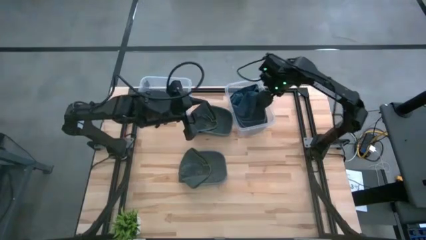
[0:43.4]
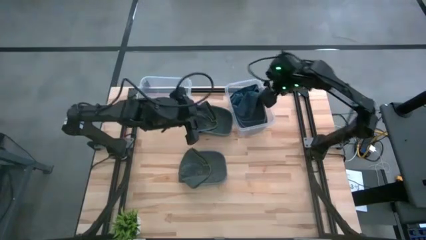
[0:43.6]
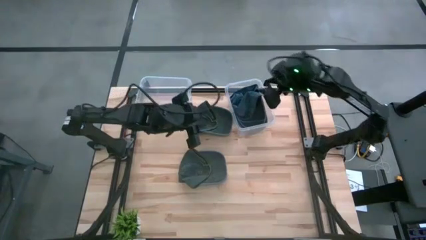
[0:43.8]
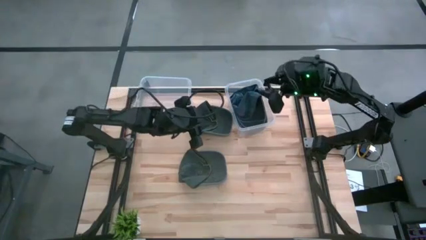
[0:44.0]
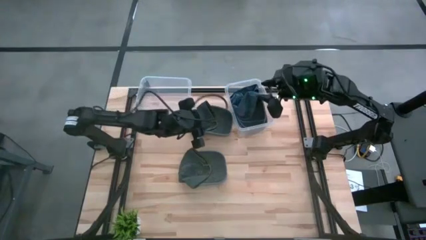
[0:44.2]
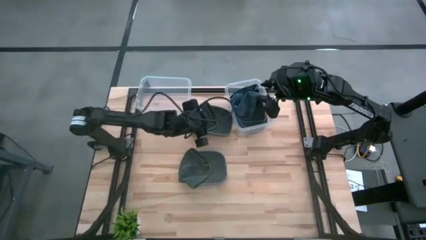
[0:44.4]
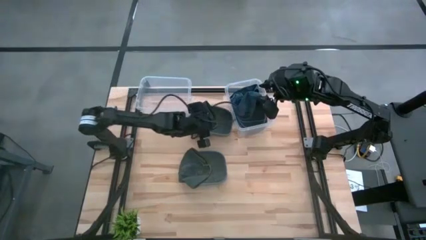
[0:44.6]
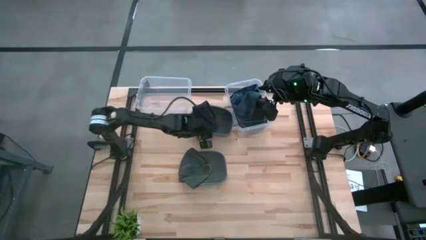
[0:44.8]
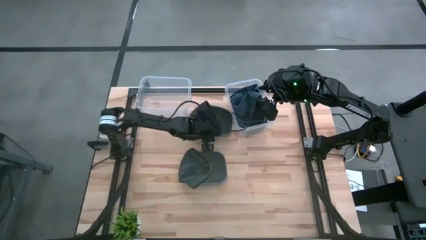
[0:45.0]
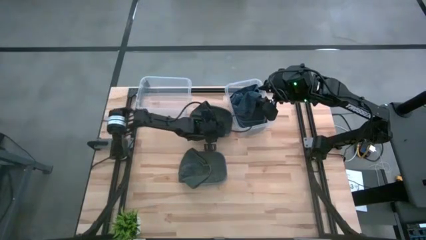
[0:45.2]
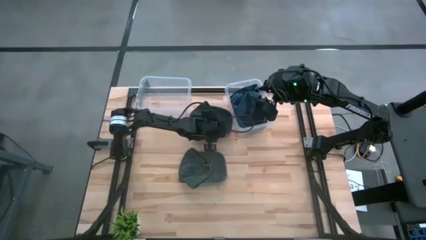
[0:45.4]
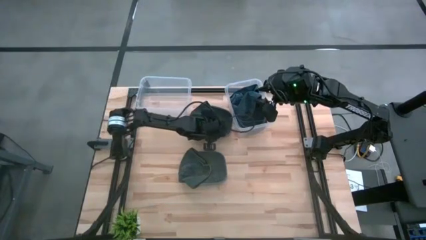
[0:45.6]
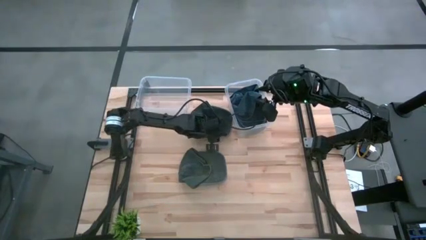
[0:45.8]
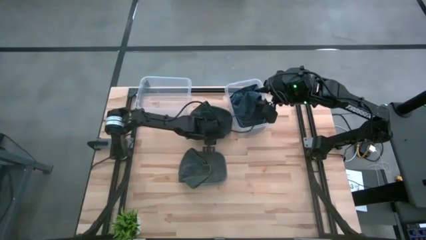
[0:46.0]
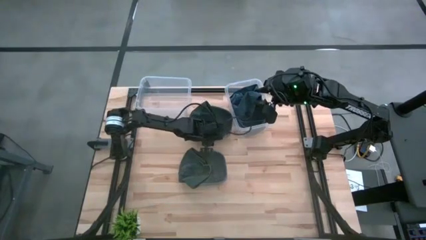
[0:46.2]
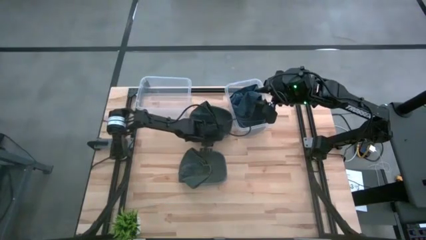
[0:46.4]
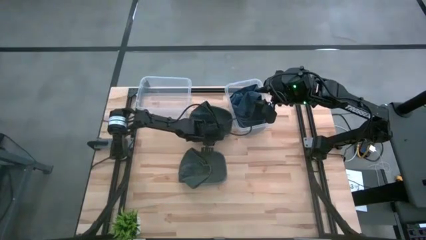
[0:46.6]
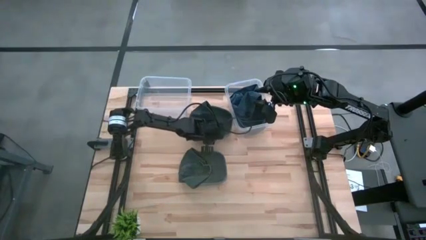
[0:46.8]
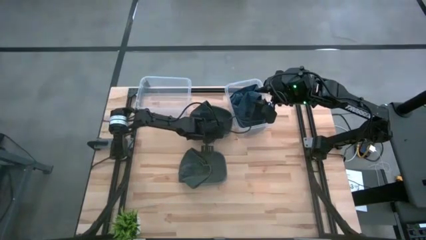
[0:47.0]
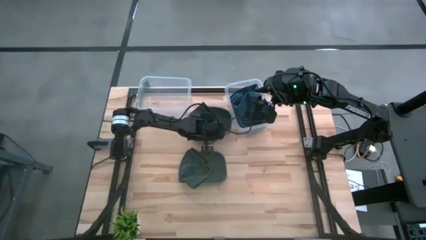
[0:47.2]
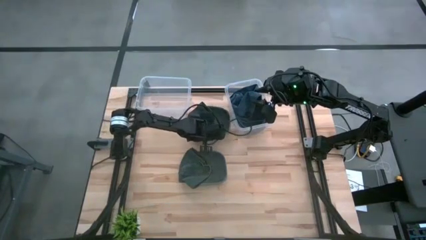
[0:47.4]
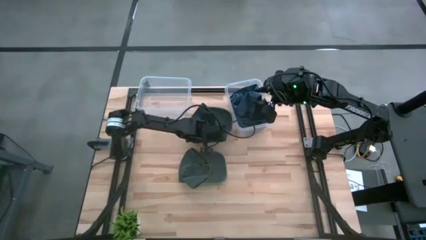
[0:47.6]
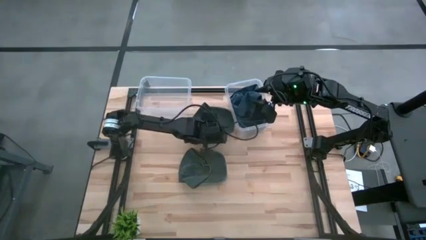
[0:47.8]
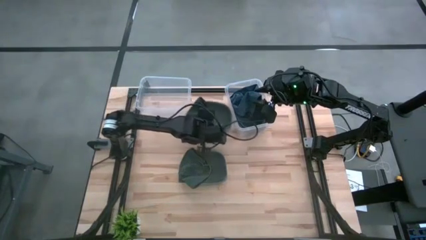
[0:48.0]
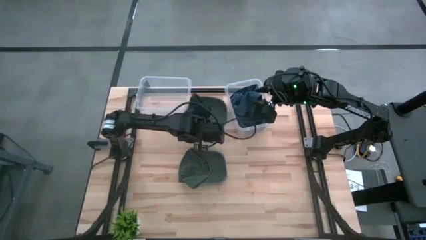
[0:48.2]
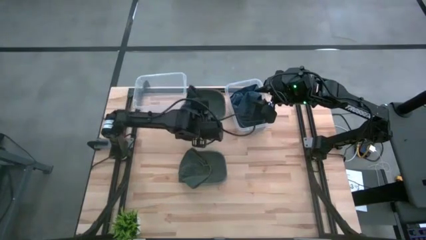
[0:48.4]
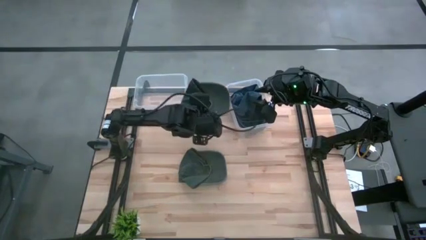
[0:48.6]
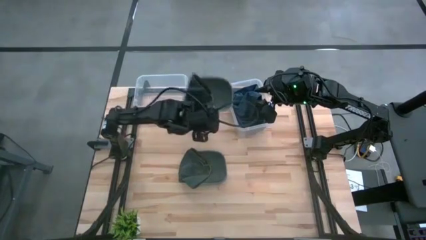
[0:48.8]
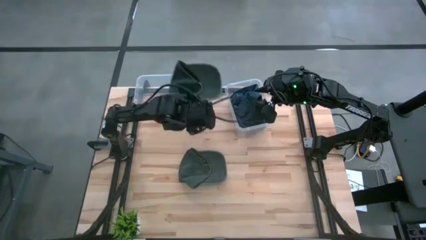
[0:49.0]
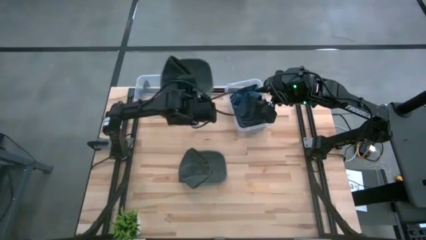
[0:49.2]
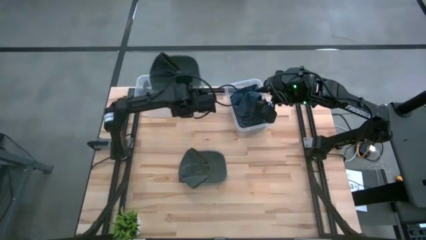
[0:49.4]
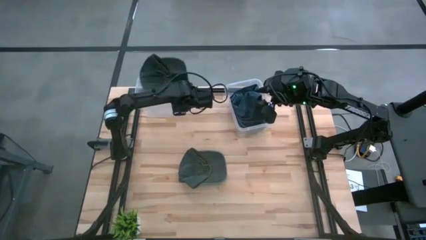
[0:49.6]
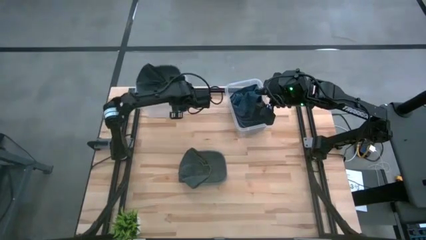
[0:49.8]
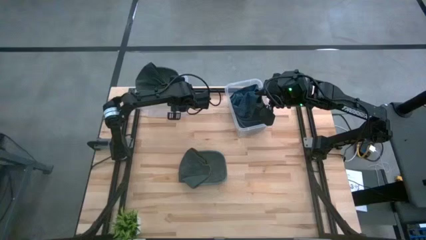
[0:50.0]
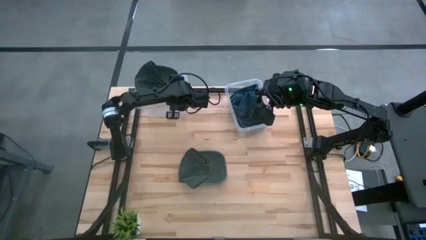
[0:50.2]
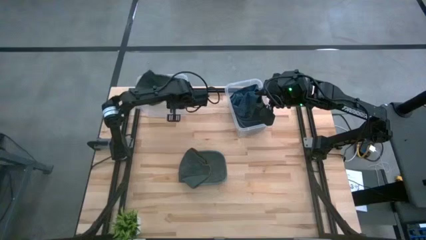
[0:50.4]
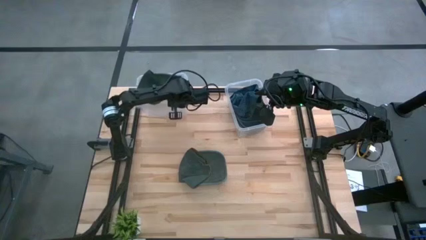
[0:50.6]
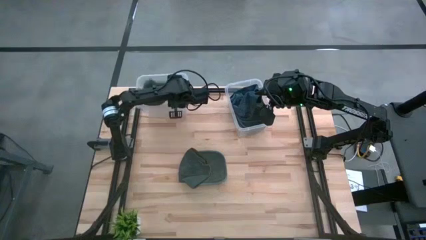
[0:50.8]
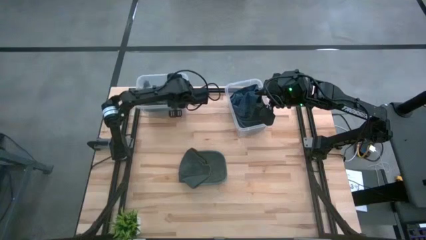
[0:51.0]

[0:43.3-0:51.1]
Task: Pick & Place hat
Put the top gray cap into the left transparent bin

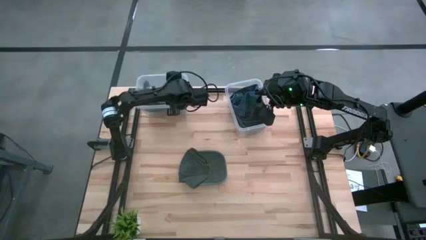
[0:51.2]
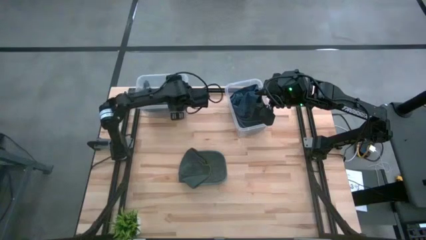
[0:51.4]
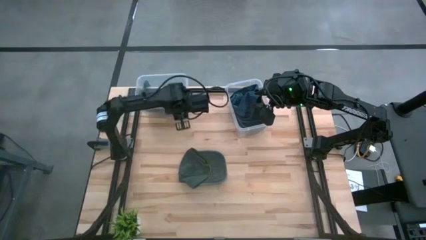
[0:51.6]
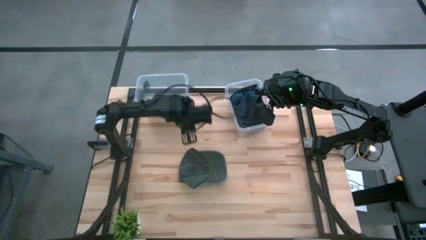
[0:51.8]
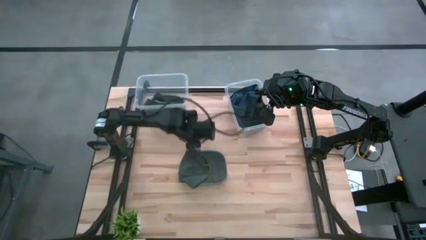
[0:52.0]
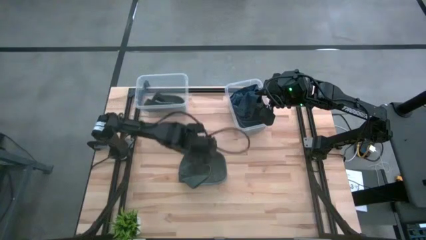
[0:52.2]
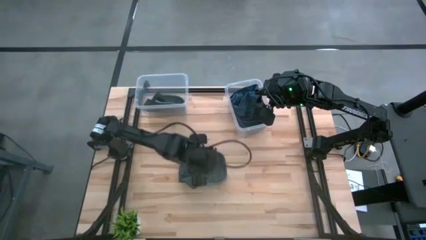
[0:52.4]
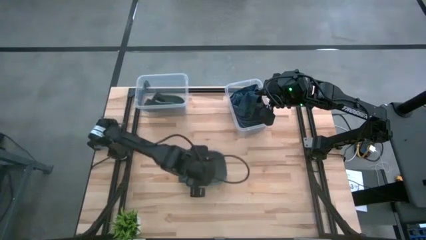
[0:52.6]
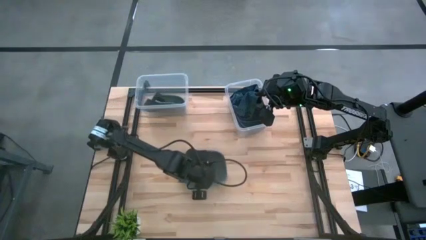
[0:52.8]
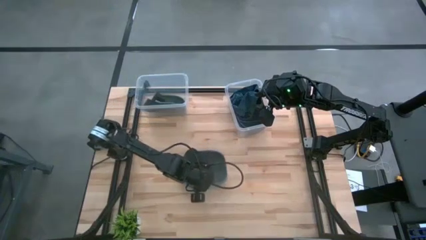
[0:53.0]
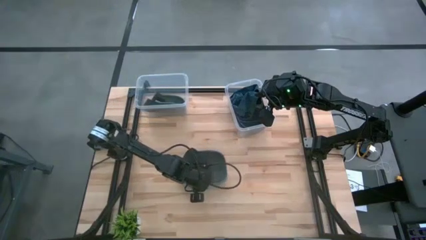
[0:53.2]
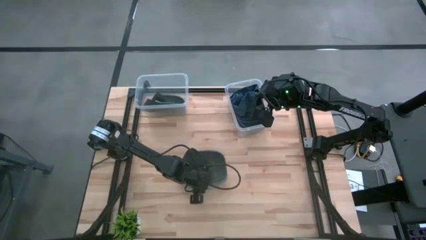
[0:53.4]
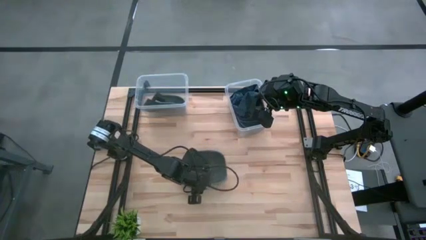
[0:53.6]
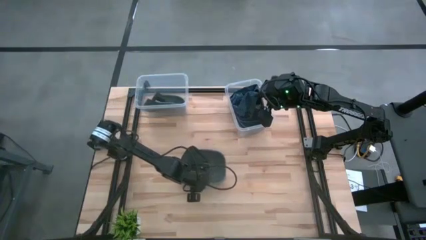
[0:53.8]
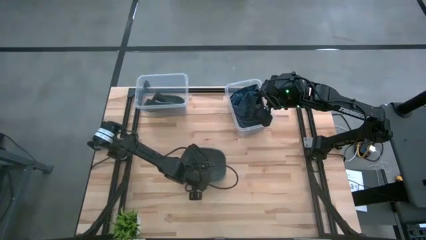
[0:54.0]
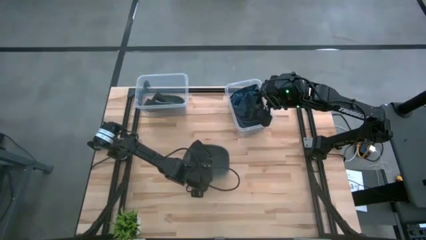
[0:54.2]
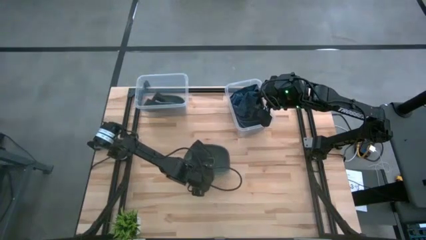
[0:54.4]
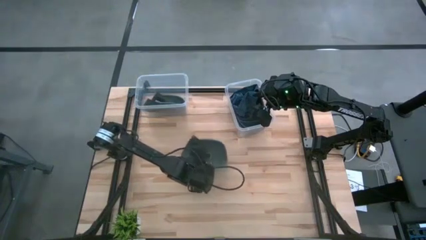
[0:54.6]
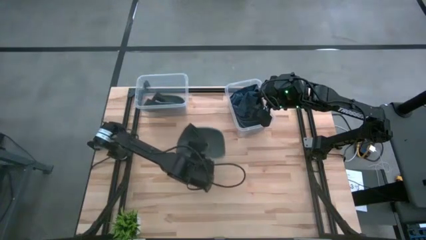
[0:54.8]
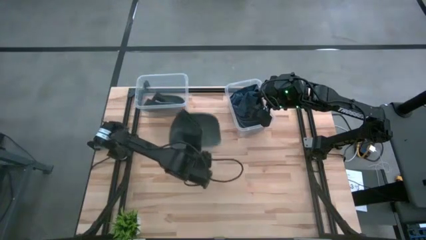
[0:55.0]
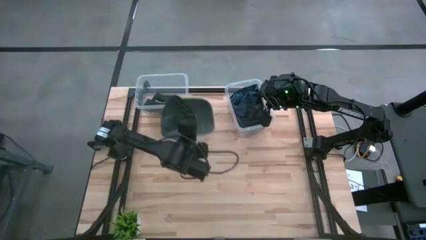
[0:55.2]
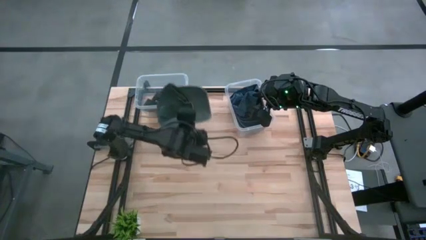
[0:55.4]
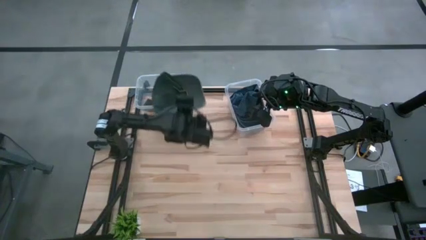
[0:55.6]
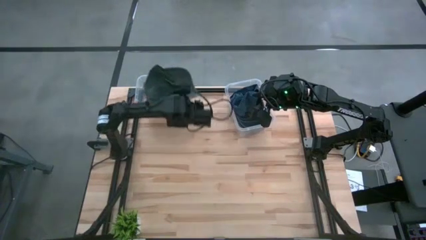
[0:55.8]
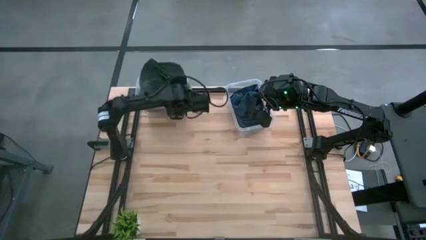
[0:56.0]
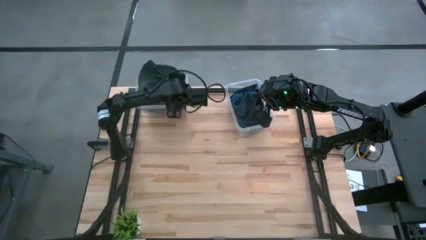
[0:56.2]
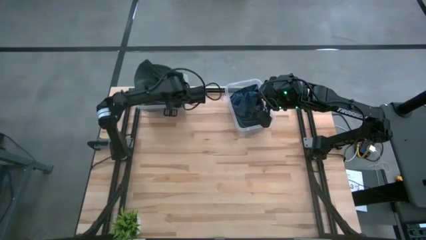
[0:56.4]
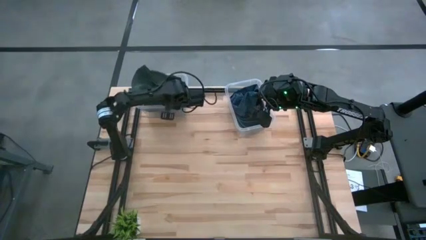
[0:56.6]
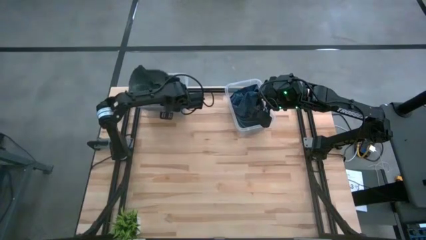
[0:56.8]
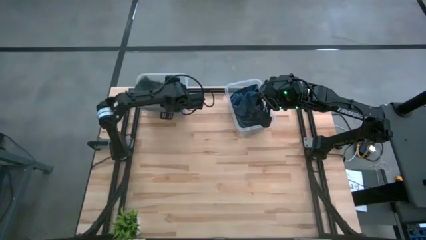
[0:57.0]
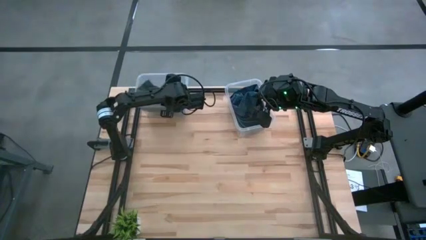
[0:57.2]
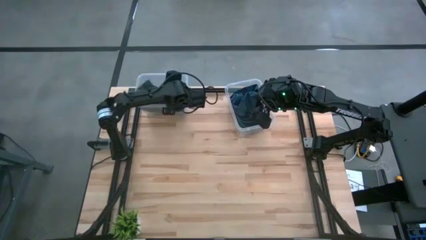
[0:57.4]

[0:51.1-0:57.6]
Put the gray cap into the left transparent bin
